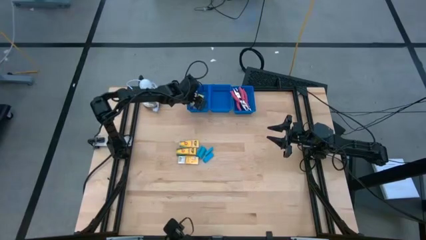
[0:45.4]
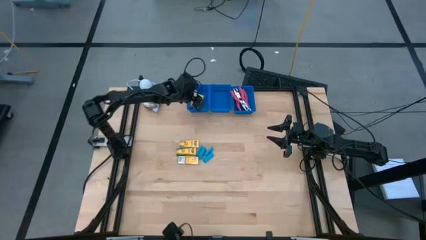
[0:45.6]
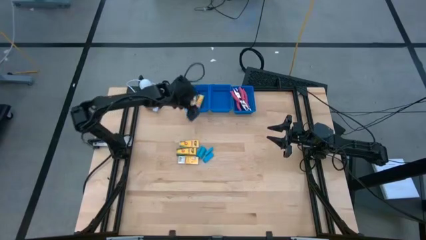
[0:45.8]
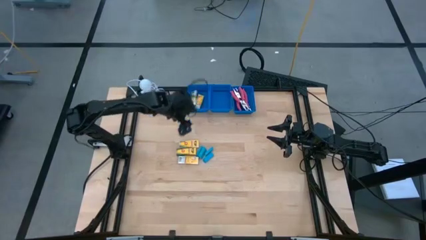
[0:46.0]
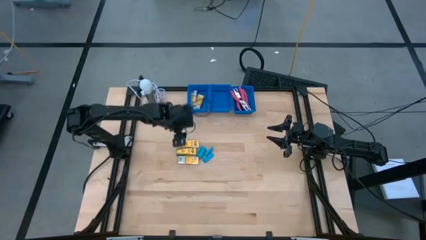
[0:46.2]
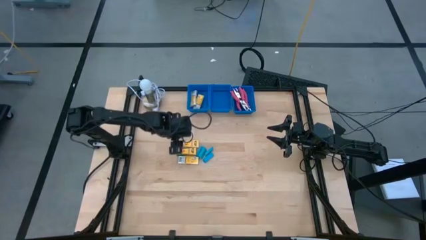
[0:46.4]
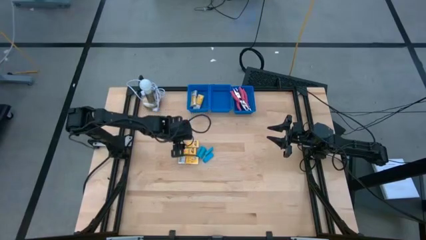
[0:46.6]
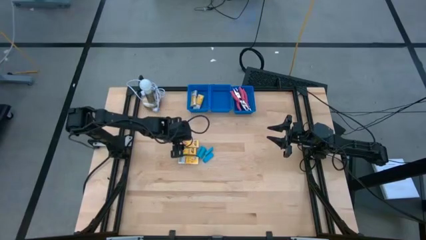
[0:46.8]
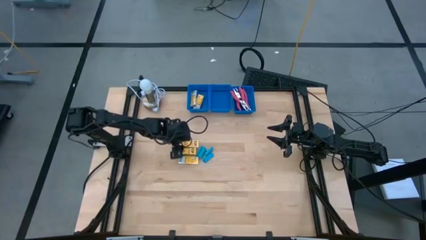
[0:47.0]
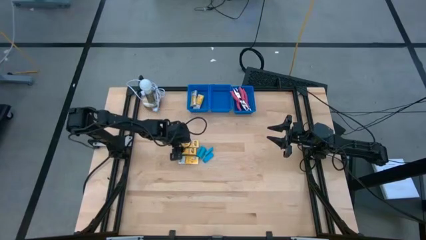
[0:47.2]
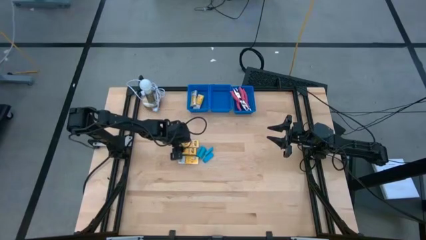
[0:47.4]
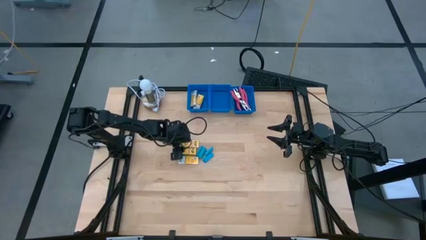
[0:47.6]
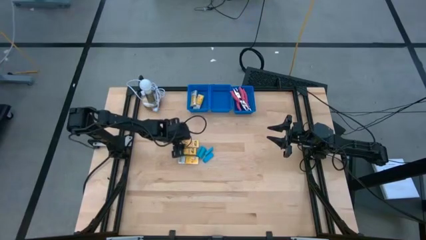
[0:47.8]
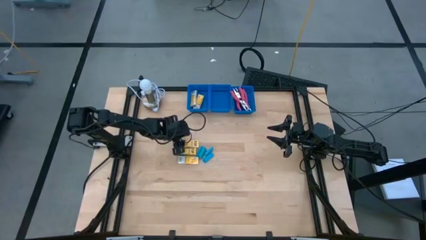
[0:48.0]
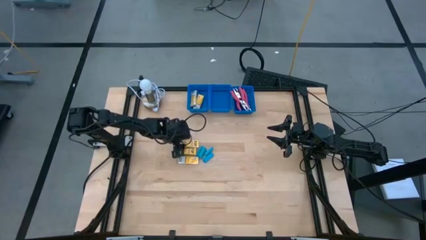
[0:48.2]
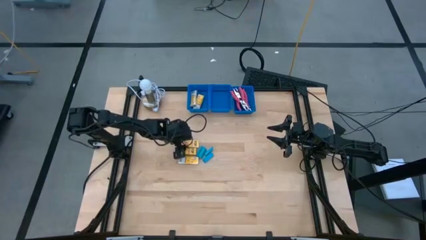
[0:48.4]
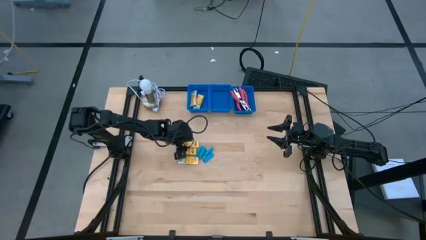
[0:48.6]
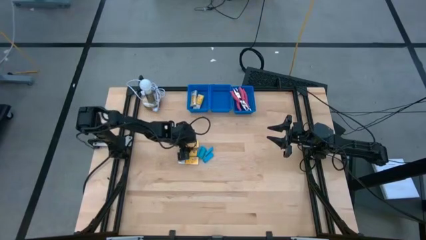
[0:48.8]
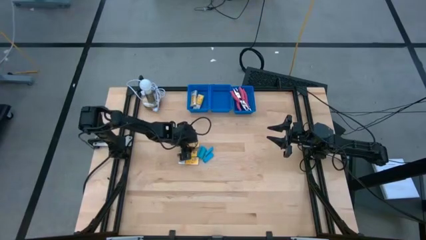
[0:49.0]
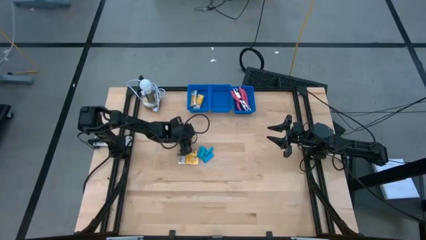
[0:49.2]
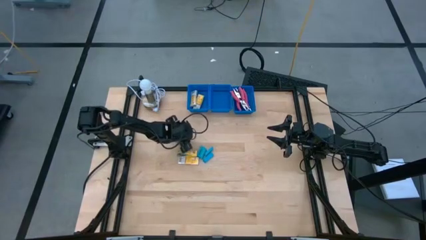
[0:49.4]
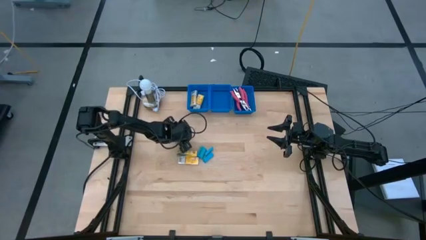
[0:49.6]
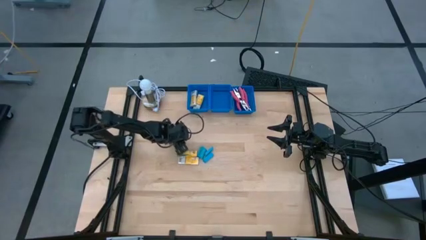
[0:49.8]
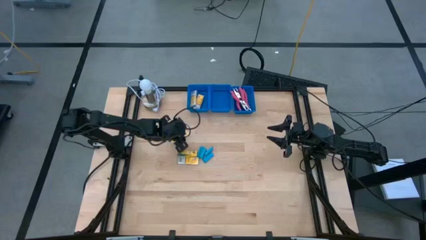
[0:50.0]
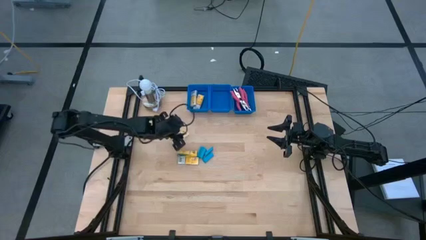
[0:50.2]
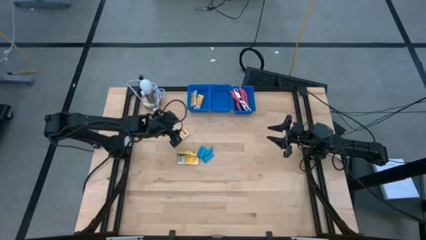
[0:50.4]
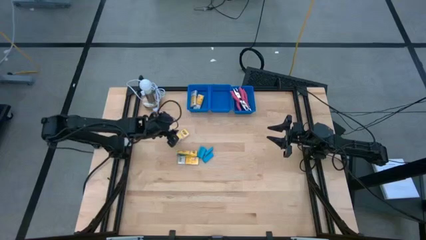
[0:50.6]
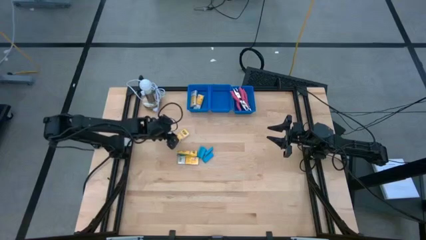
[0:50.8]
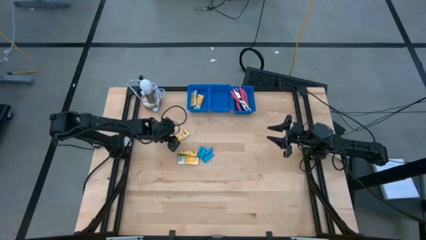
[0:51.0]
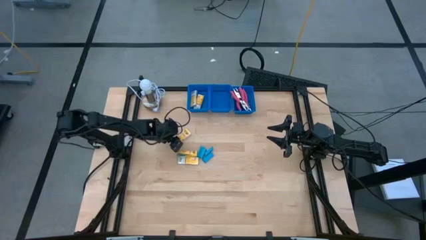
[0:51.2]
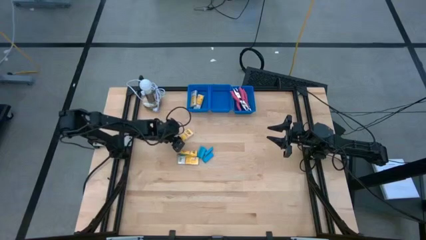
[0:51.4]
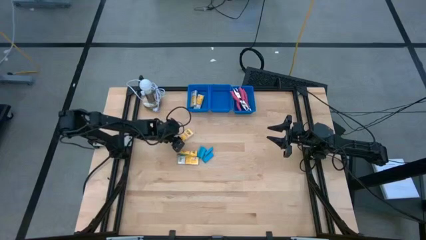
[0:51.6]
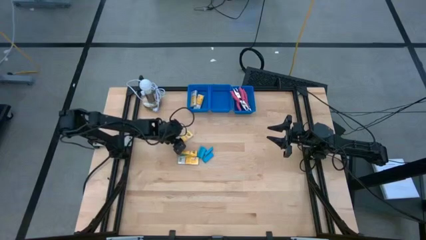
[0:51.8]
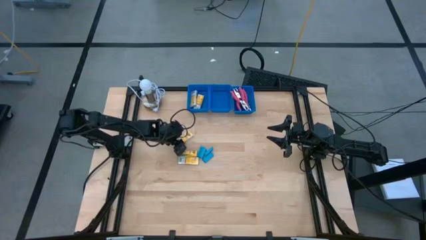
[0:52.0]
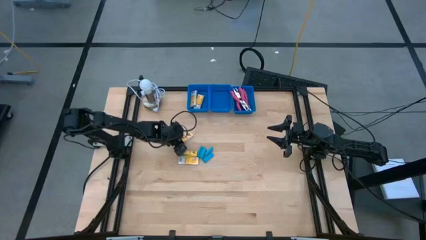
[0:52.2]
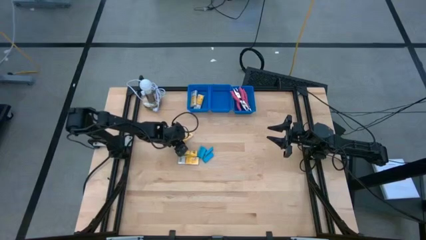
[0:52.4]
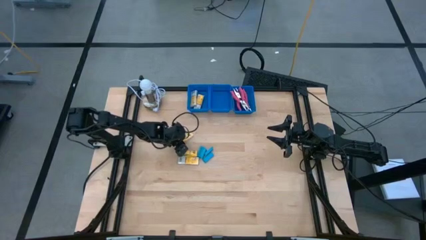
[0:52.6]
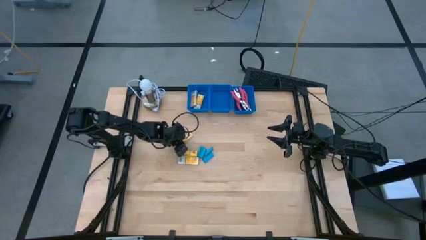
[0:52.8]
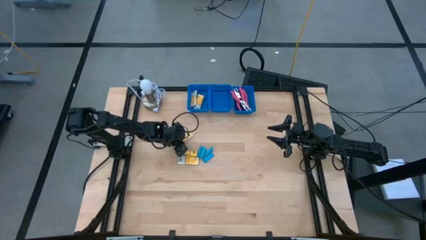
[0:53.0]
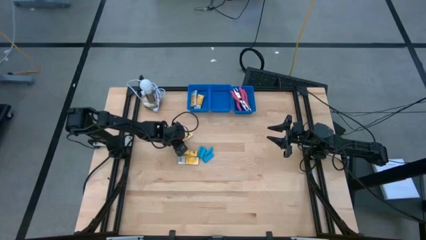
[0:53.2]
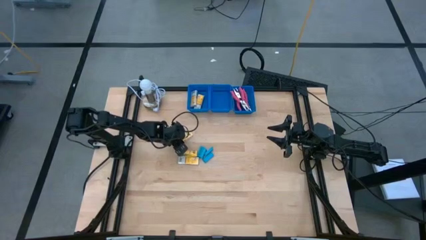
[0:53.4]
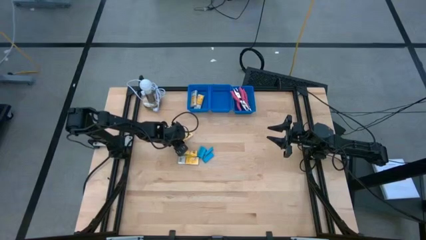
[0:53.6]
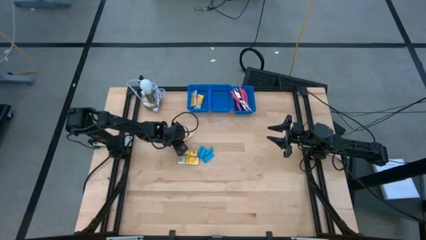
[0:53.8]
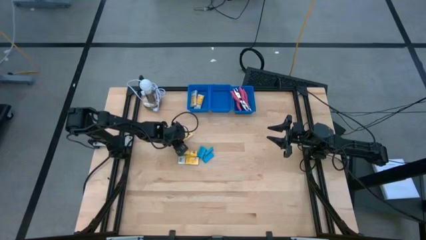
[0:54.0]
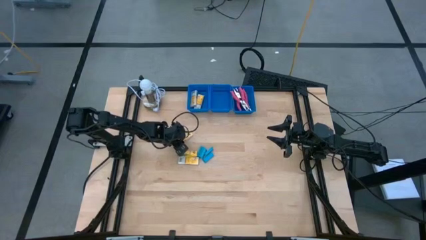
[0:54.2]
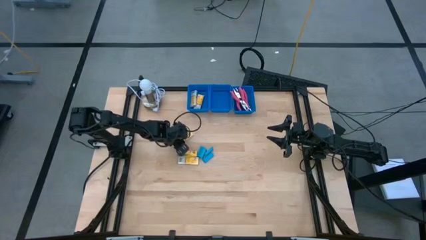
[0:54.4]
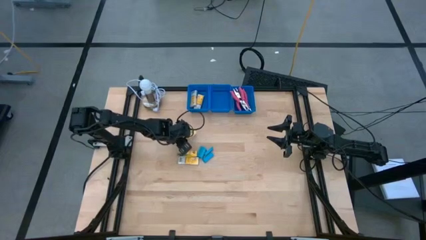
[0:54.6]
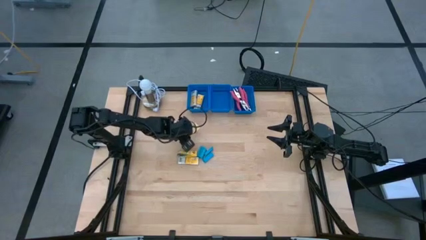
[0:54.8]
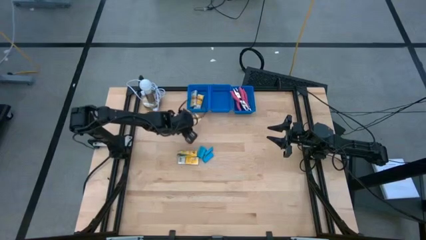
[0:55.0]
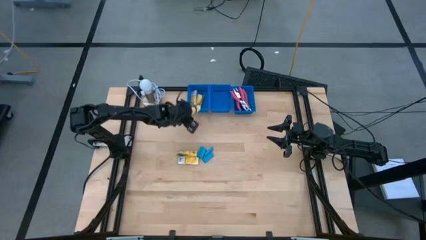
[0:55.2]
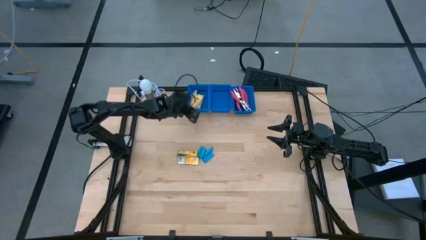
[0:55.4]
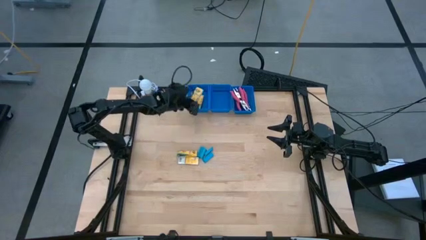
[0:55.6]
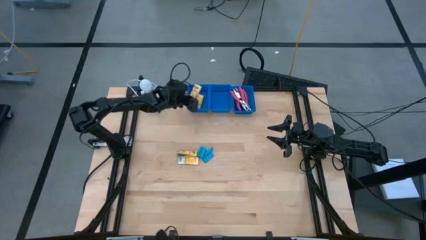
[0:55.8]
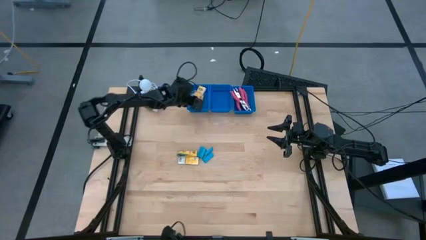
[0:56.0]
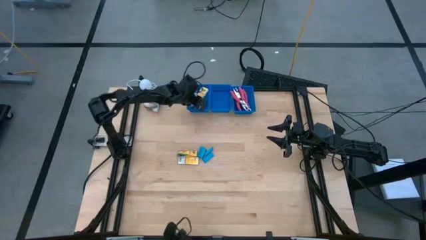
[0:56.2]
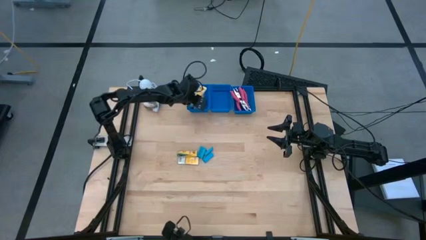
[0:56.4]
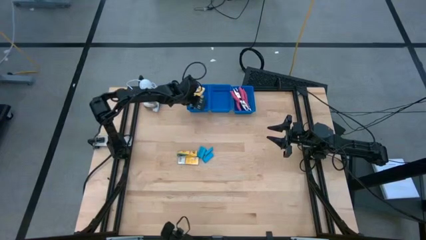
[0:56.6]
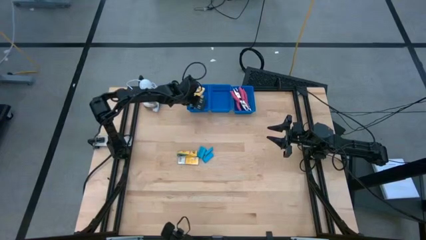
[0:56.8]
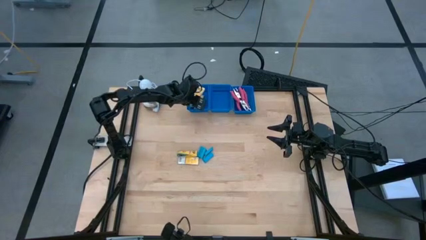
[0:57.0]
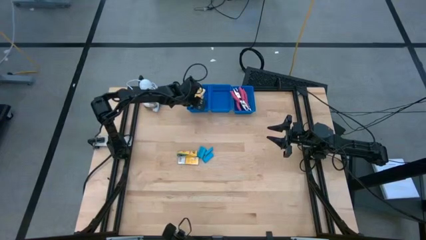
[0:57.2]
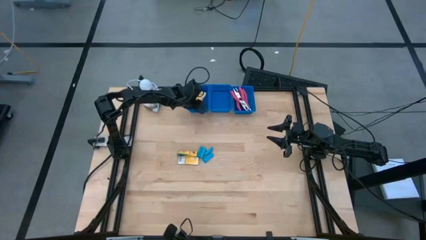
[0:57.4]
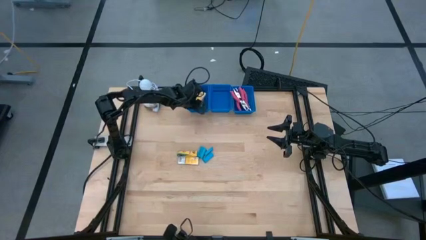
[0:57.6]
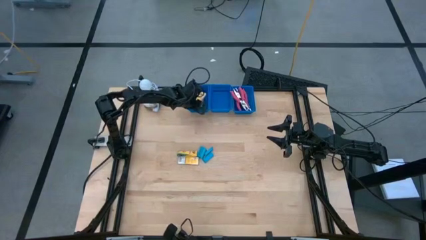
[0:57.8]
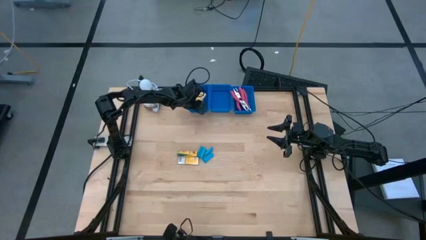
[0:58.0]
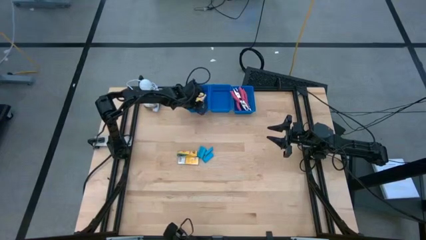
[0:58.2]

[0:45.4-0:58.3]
Task: Pick & Place School Supplies
Put the crayon box into the left blue bin

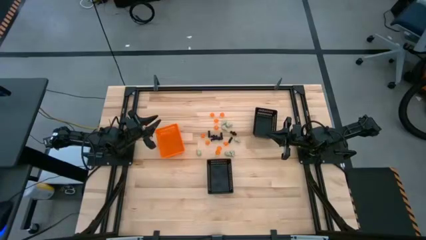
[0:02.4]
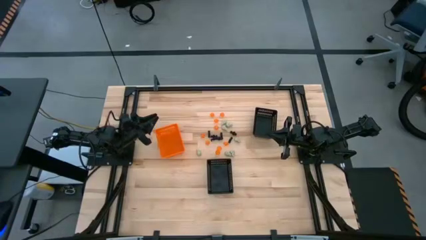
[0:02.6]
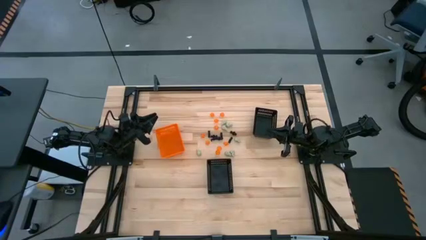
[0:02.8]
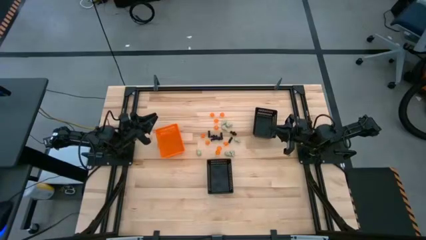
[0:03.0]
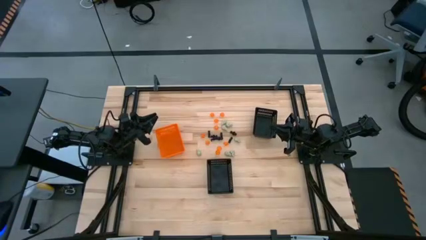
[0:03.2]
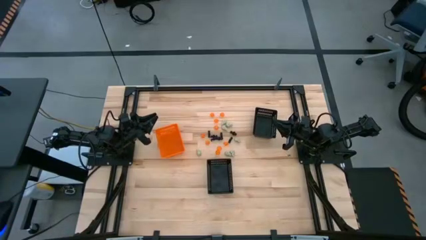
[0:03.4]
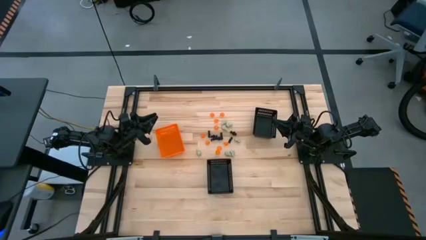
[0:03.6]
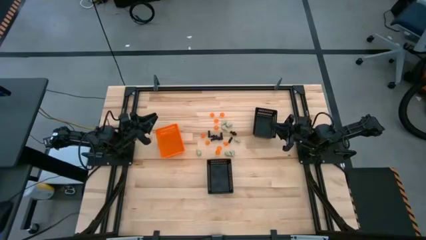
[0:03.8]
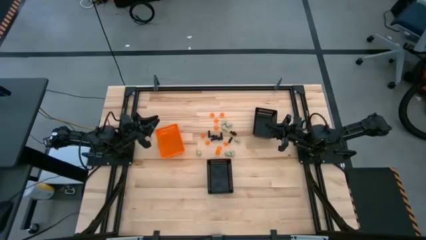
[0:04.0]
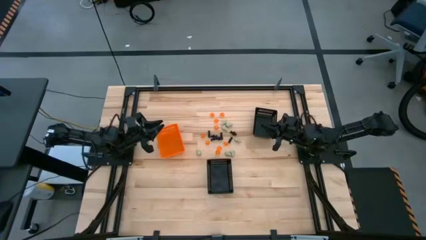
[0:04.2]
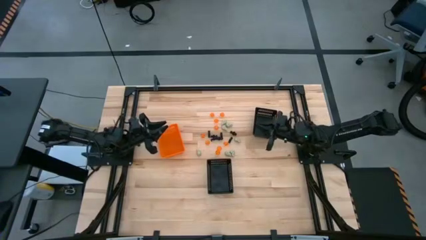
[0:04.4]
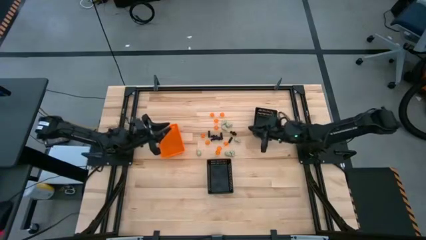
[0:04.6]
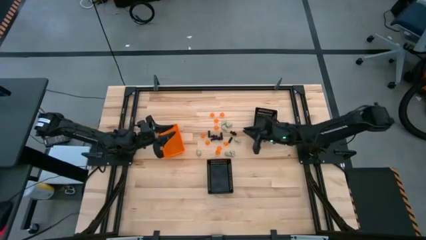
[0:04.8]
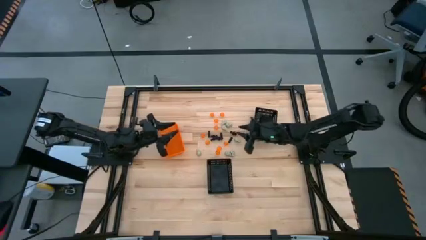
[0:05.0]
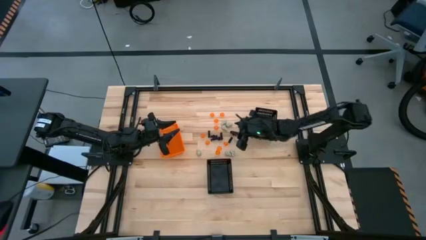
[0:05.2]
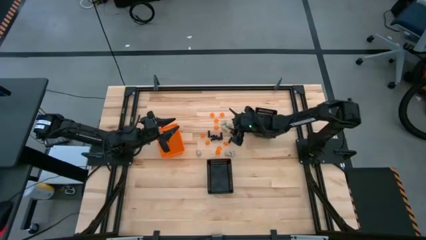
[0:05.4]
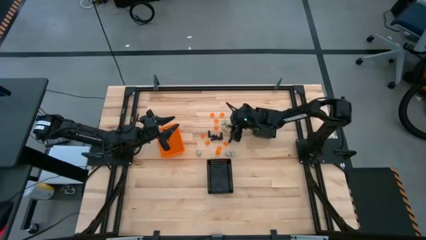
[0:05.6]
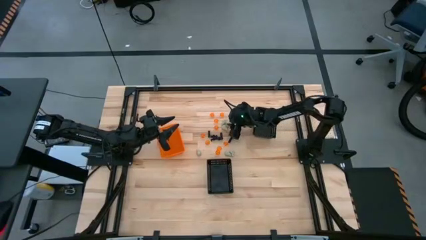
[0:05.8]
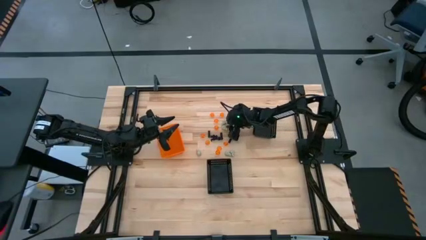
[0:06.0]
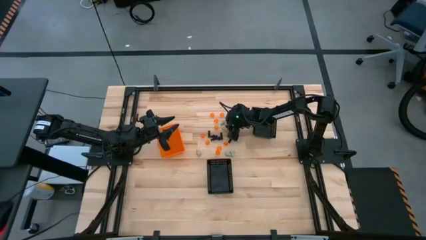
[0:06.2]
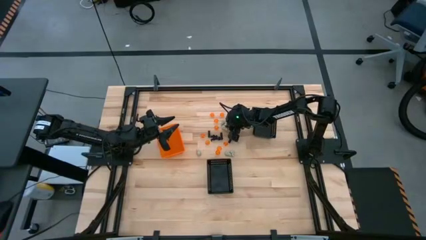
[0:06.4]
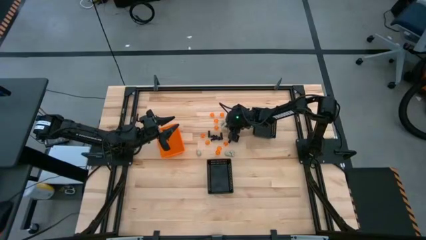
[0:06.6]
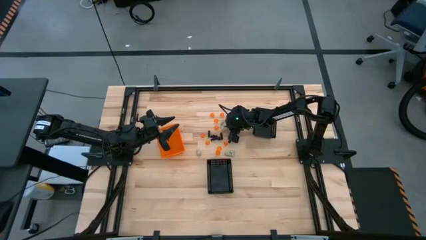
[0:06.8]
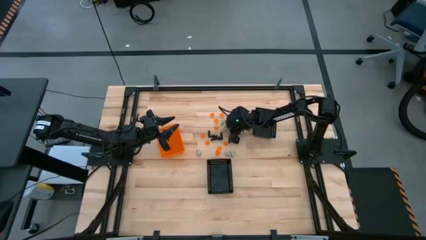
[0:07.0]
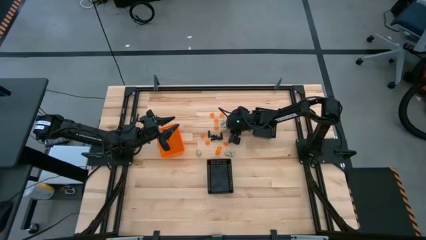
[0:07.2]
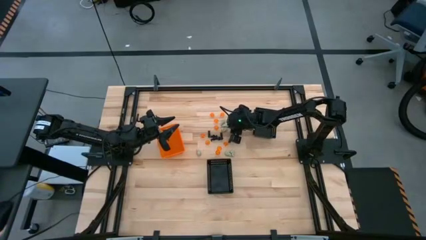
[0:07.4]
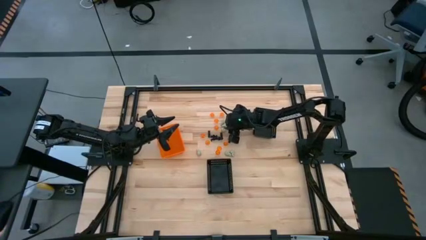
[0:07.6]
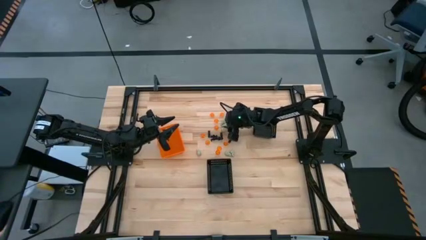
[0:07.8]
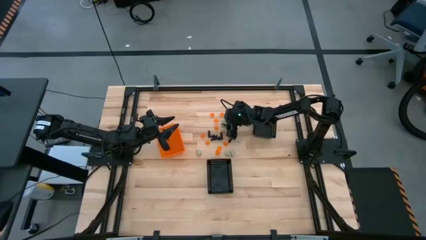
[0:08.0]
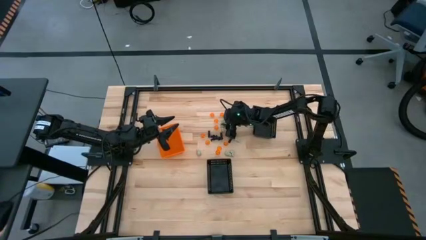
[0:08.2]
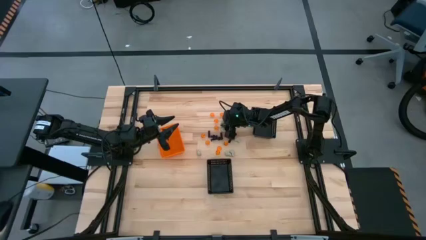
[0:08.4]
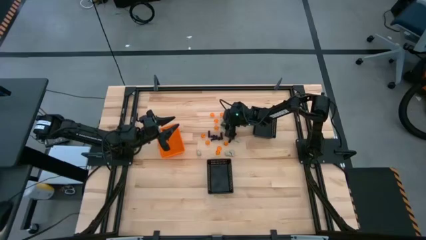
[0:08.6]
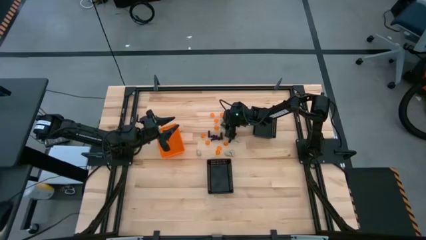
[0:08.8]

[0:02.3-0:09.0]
Task: Sort Halloween decoration
Put the white skull toy into the bottom black bin
